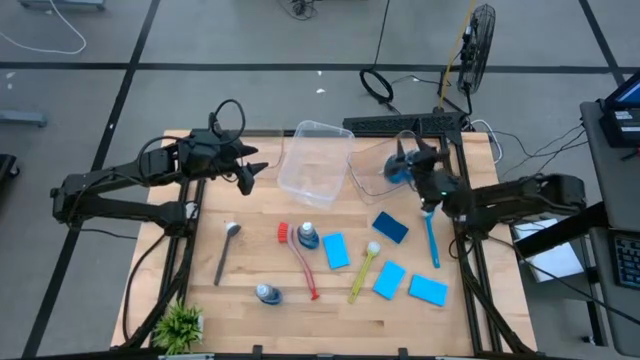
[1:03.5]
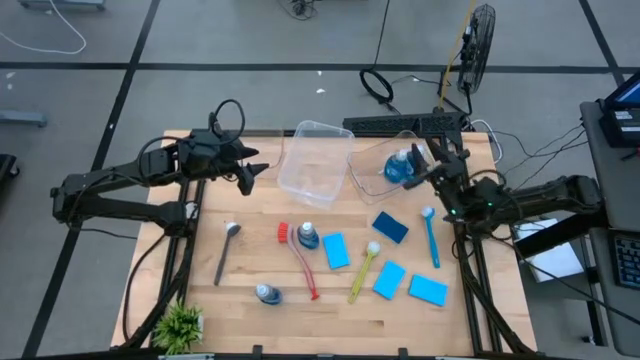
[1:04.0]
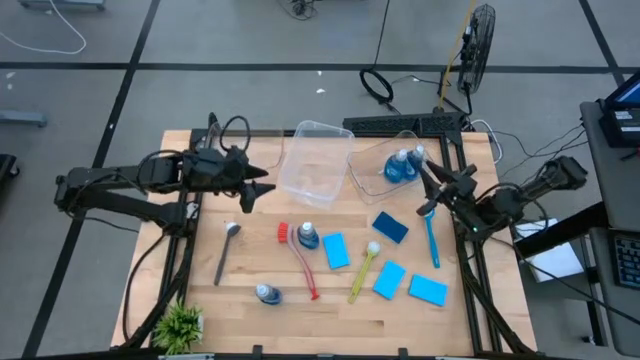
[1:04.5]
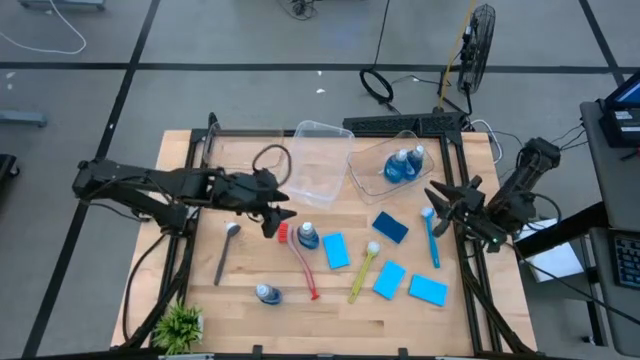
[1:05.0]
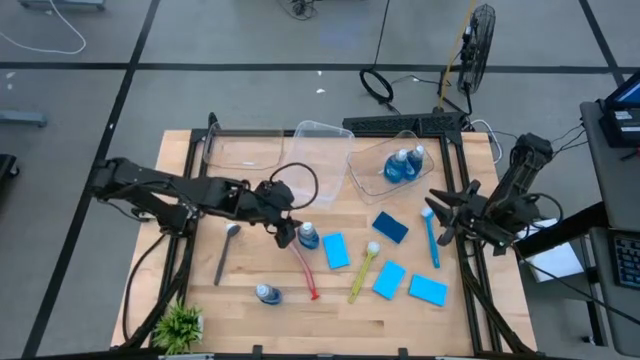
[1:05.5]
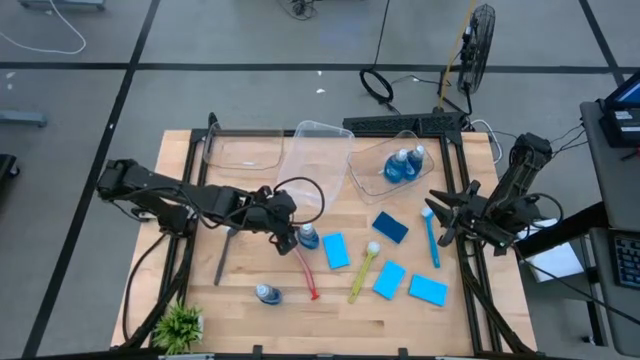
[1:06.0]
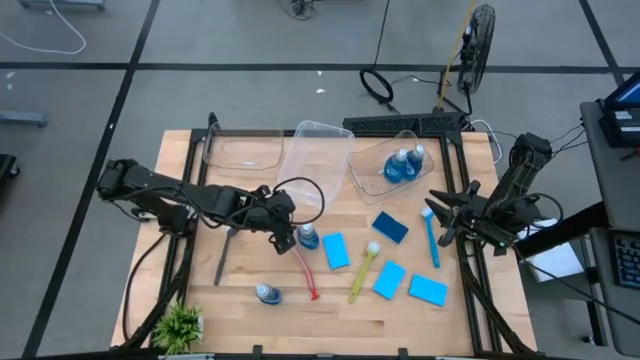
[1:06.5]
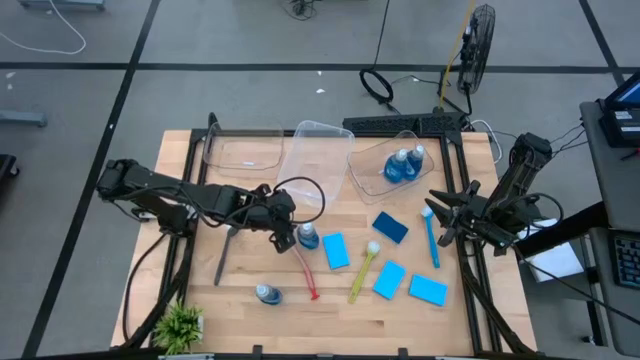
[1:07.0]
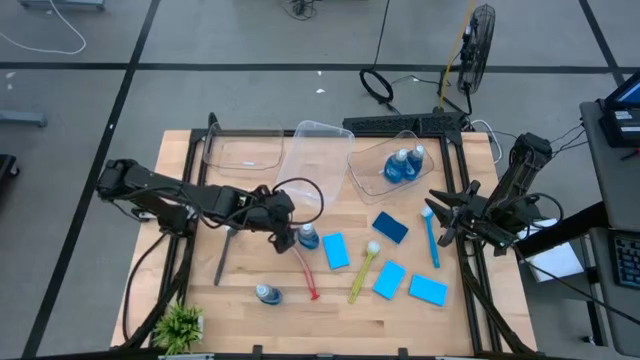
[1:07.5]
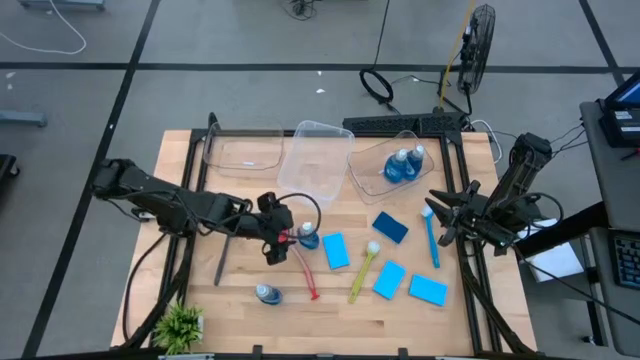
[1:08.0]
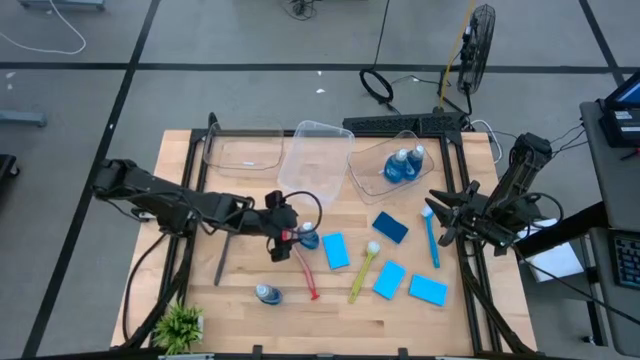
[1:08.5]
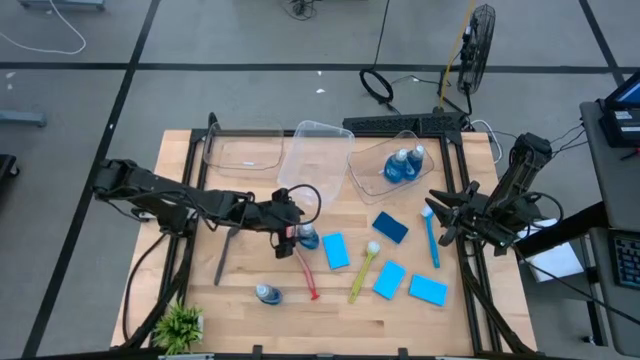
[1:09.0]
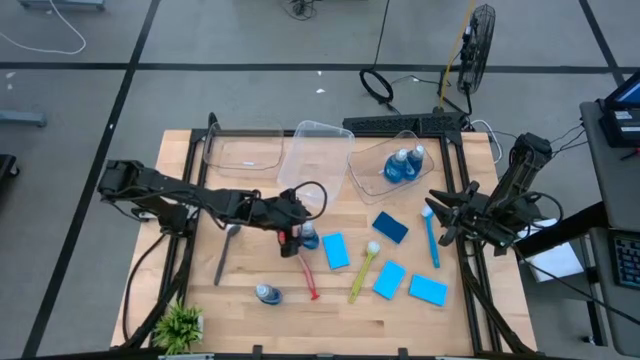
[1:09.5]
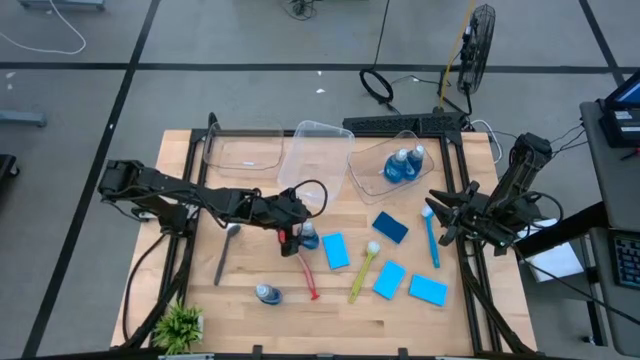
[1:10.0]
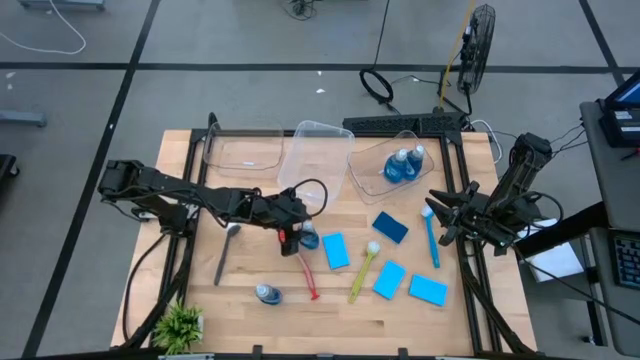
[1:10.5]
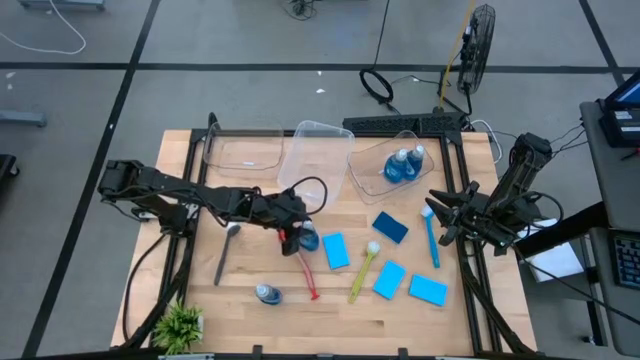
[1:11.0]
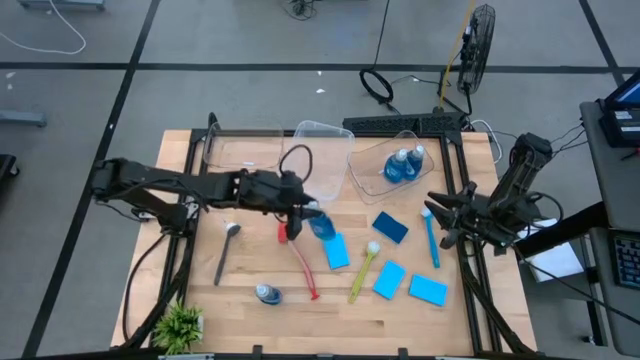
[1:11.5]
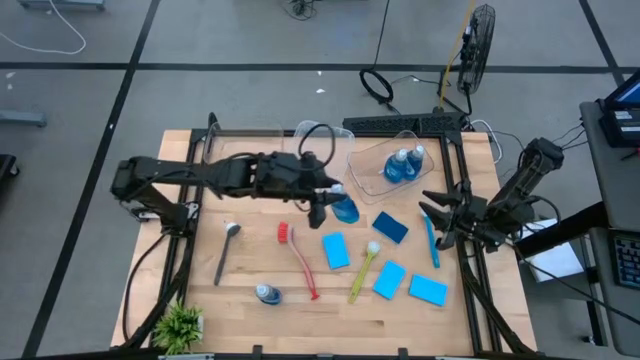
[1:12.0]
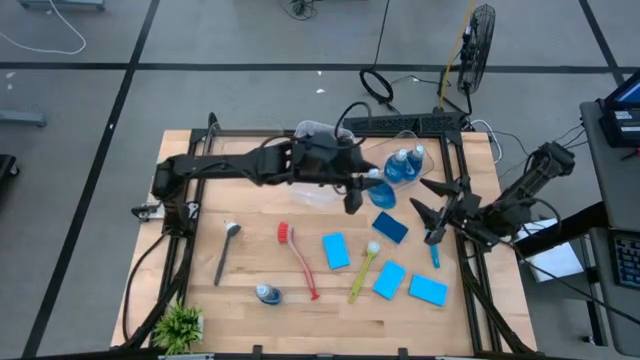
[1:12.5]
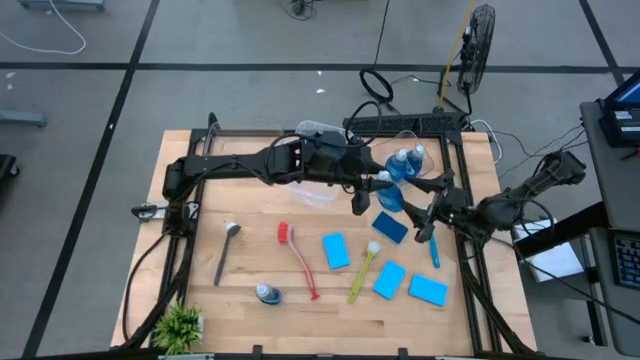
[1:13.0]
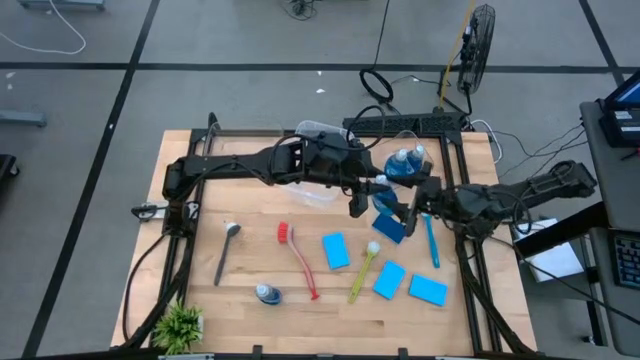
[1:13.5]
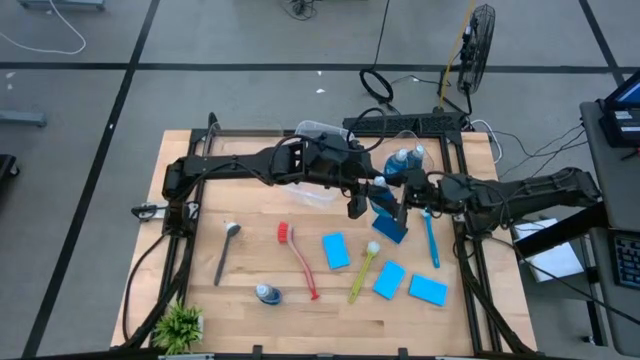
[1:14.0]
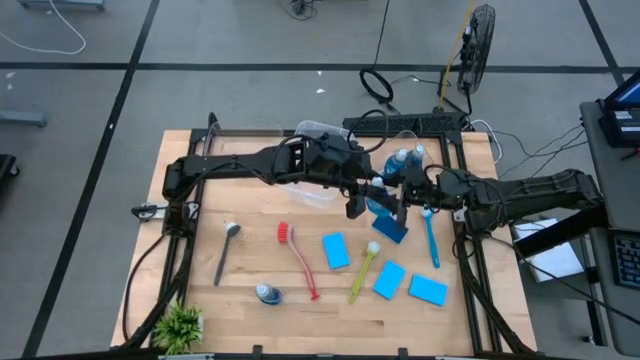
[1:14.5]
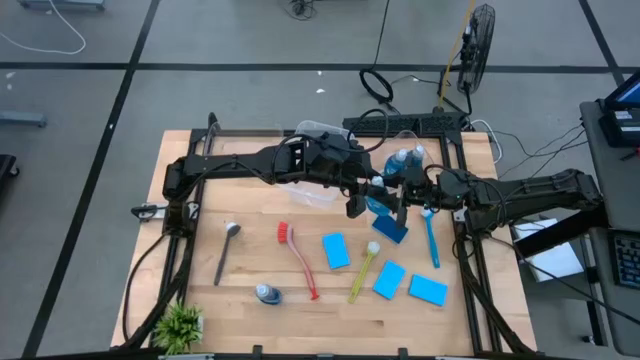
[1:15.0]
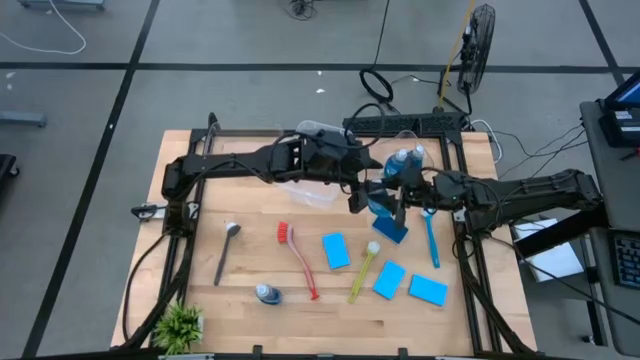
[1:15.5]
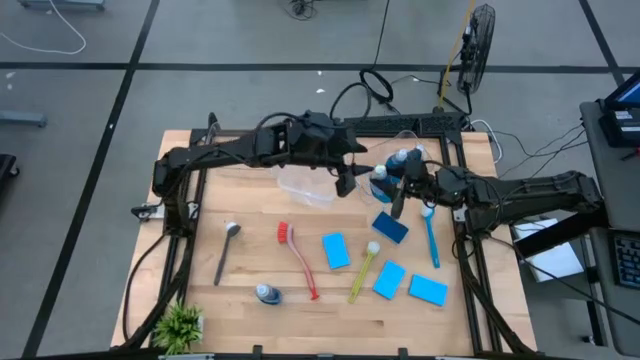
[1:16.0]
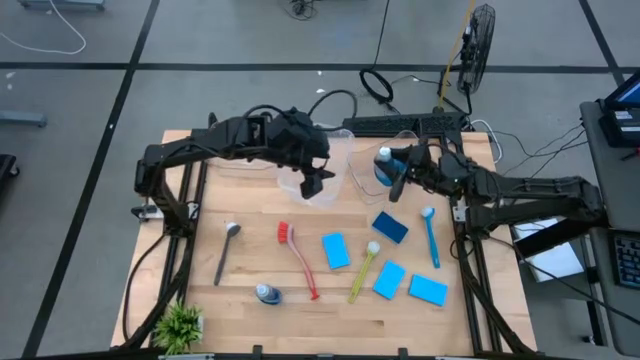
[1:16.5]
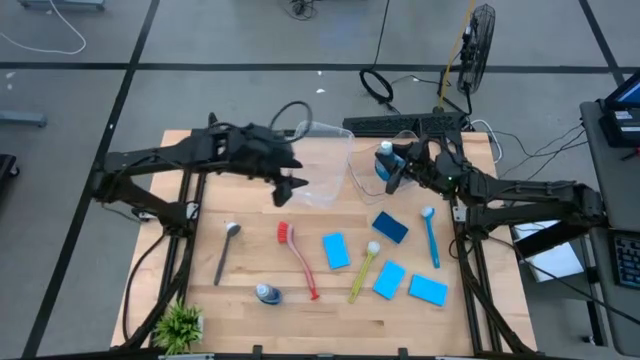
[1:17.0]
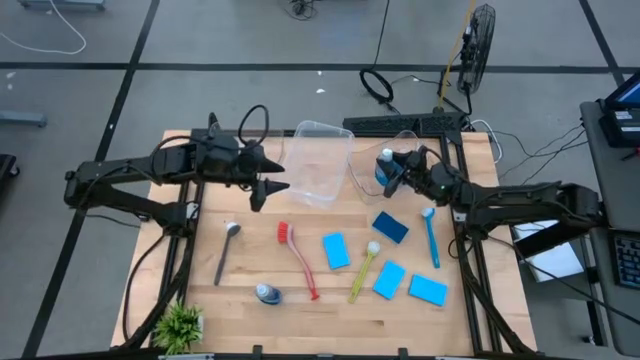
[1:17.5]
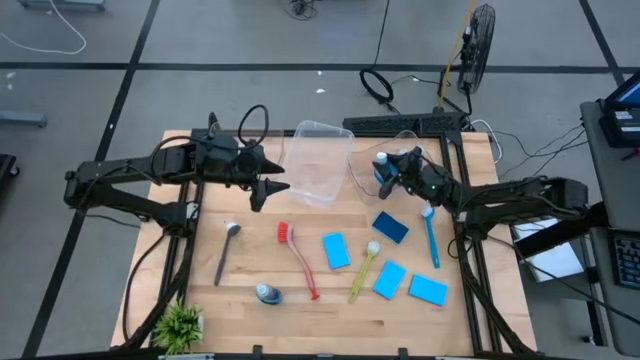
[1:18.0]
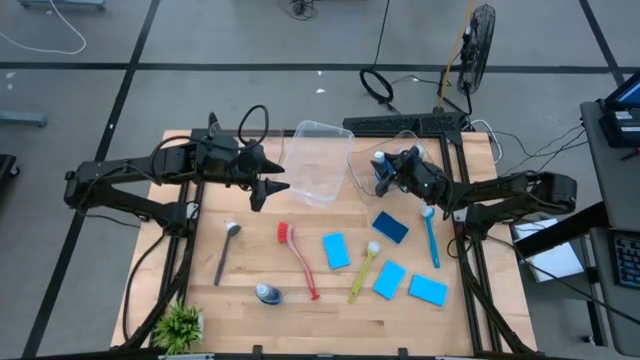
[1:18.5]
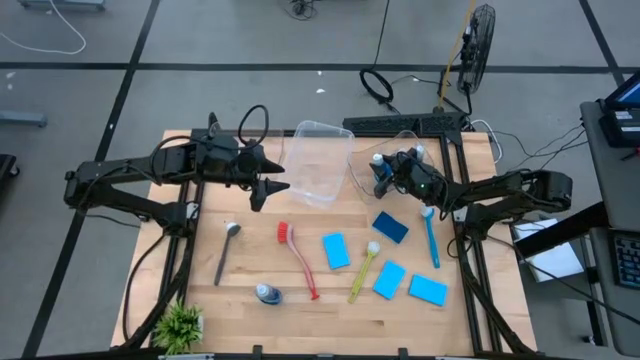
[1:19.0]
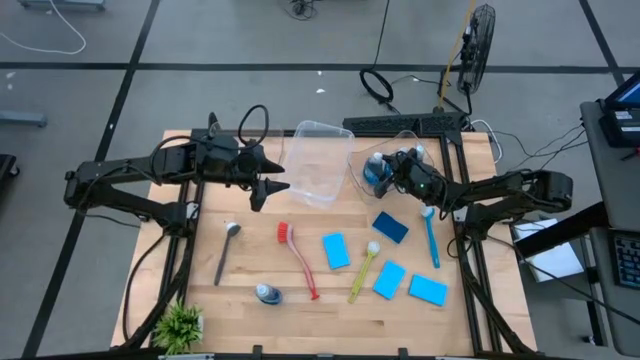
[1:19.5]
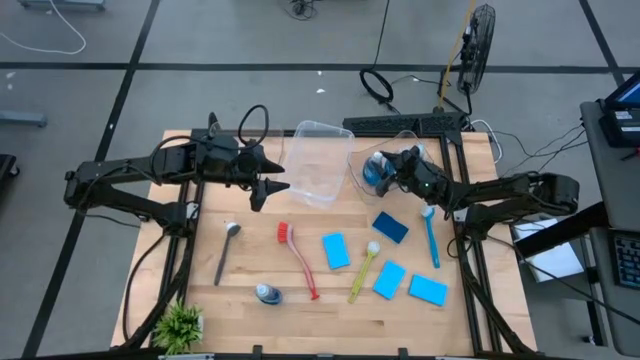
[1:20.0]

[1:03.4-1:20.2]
Task: Pick & Place Kitchen Sink Supplies
Put the blue dish soap into the right transparent bin

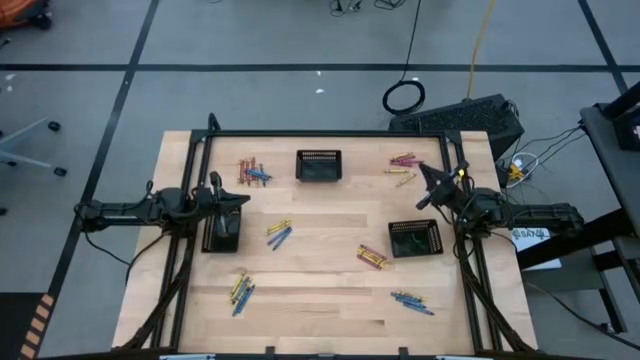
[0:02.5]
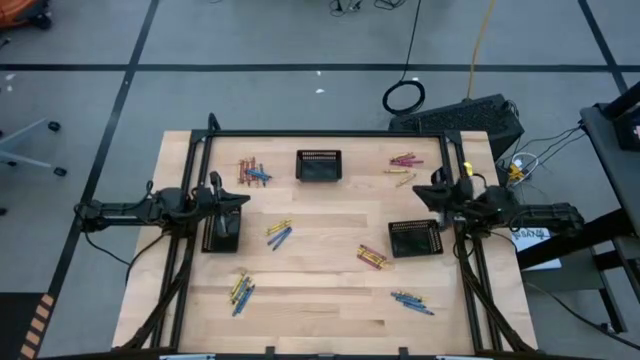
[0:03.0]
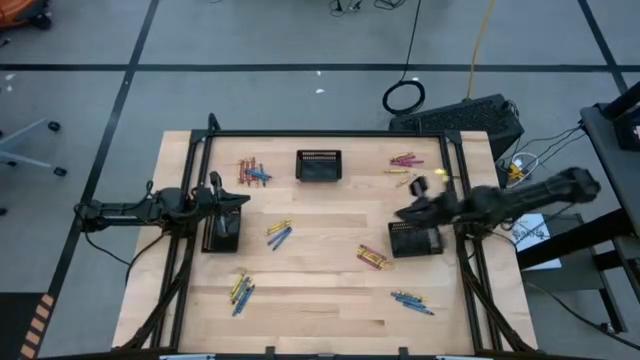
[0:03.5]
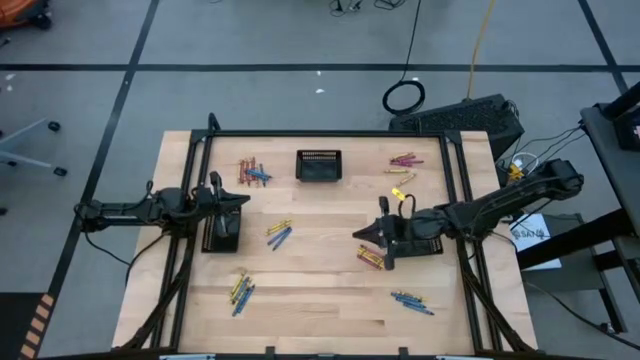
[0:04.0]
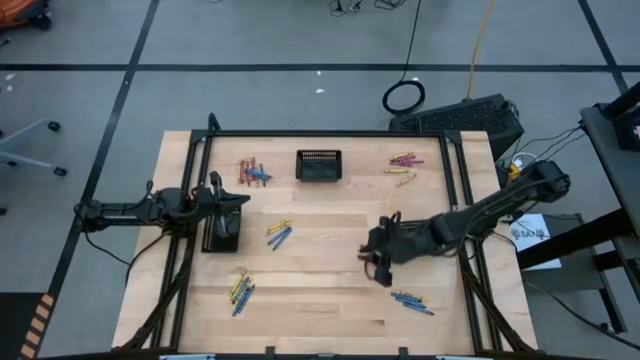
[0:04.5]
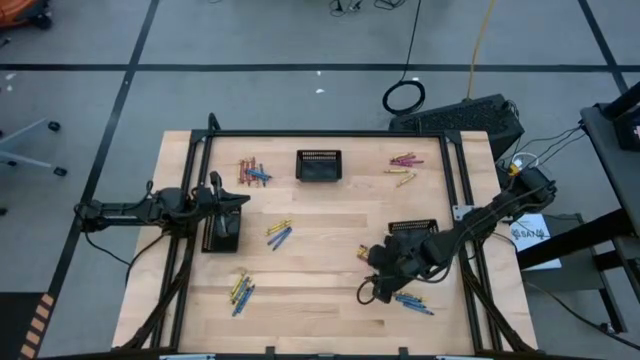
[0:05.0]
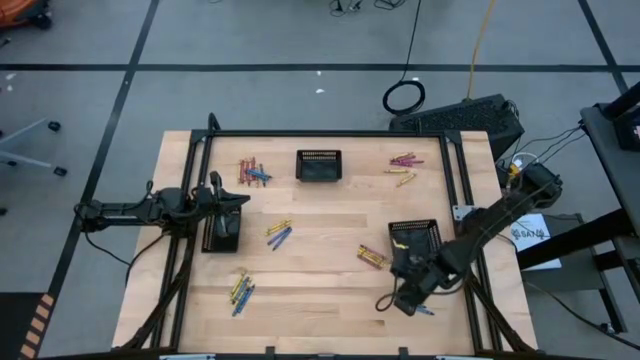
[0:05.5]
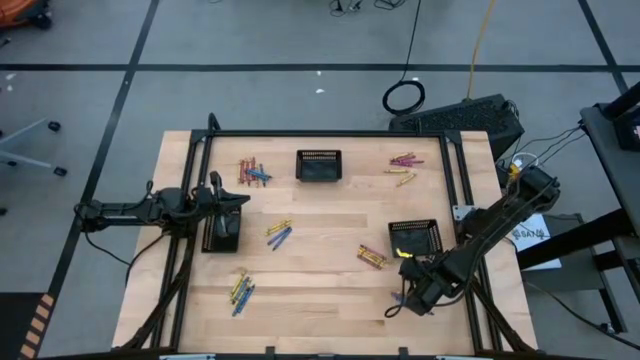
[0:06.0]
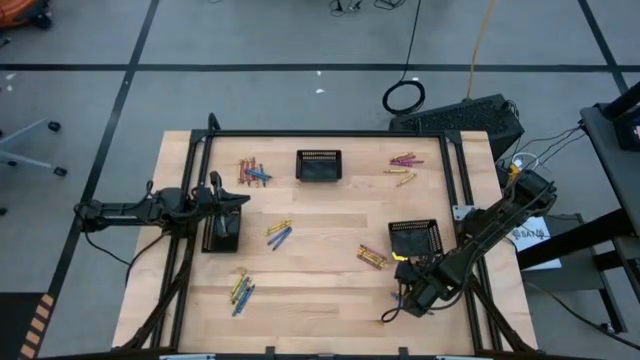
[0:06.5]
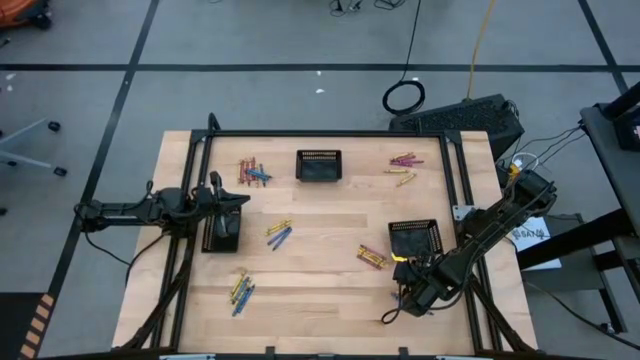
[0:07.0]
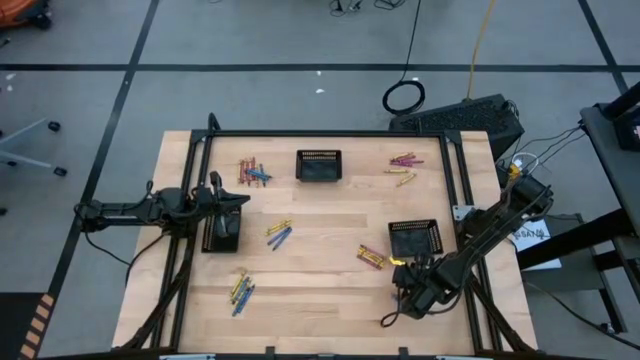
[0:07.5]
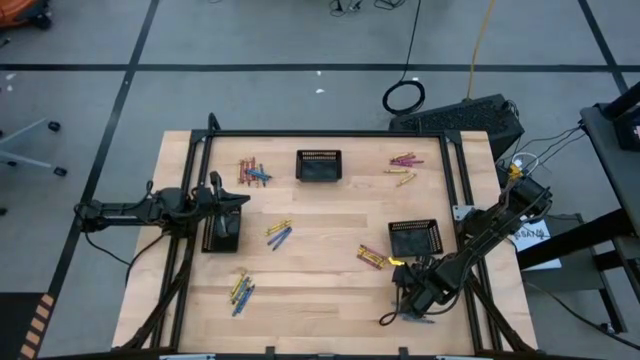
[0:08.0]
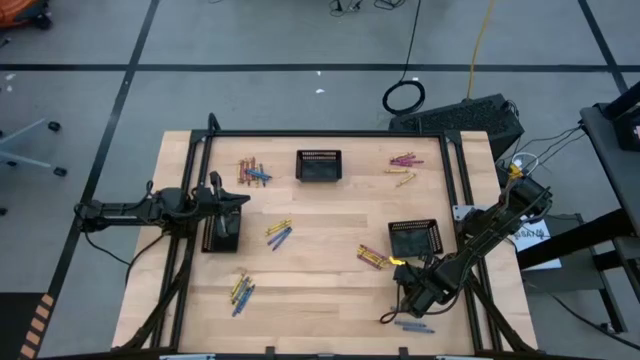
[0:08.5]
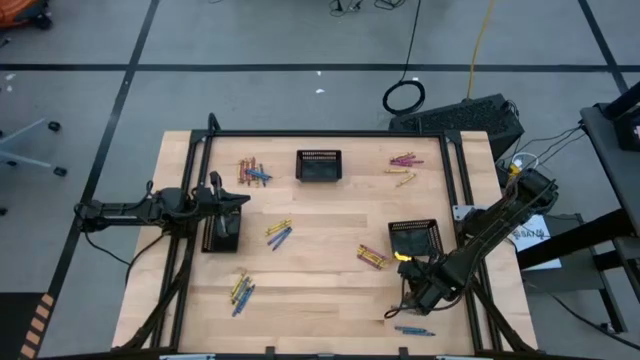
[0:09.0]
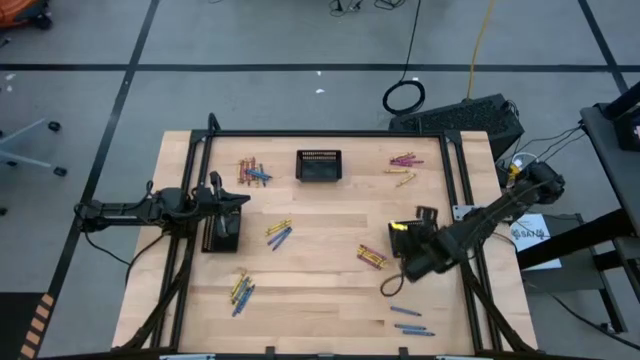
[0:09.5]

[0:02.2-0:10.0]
Task: Sort crayons
Put the yellow crayon into the bottom right black bin
